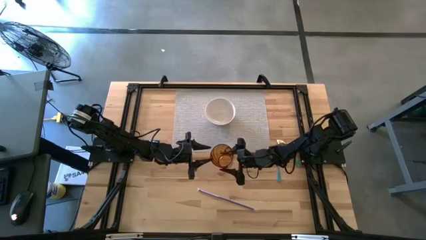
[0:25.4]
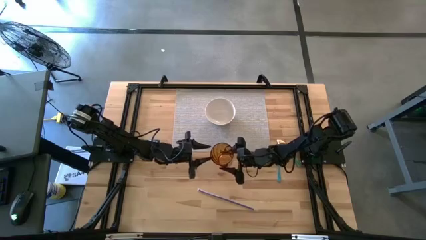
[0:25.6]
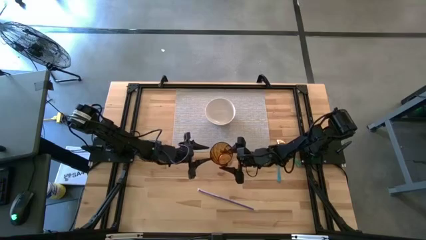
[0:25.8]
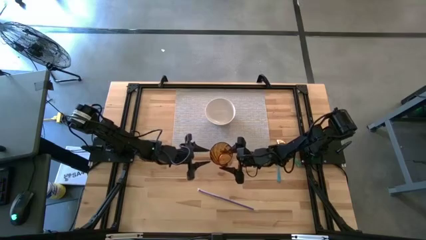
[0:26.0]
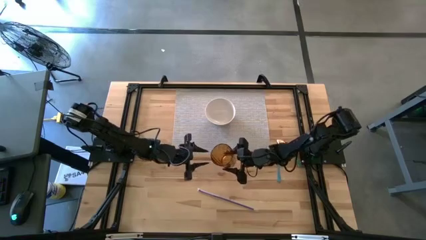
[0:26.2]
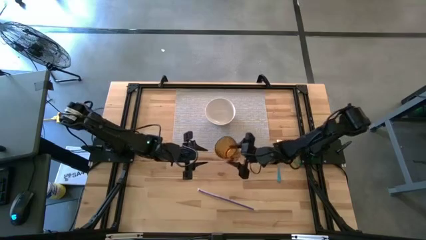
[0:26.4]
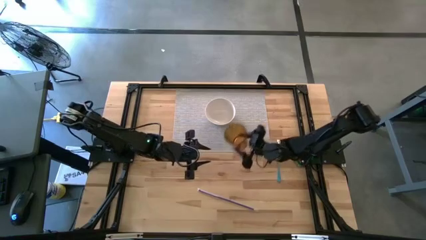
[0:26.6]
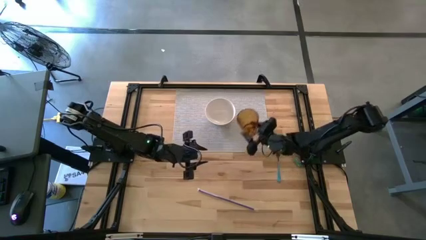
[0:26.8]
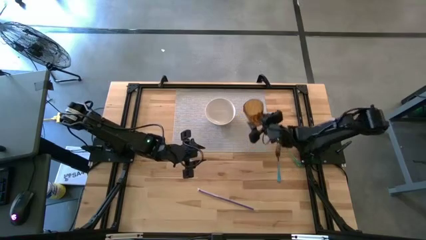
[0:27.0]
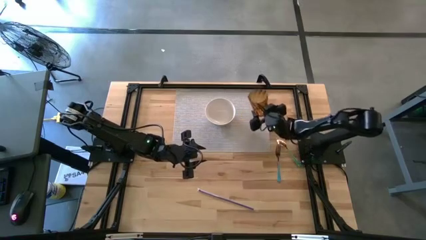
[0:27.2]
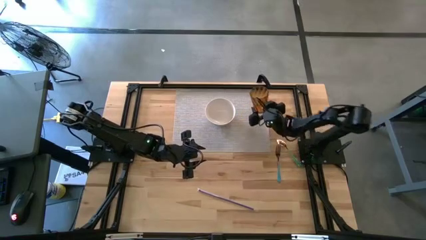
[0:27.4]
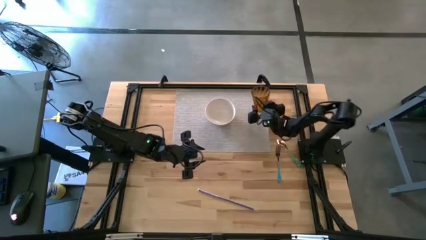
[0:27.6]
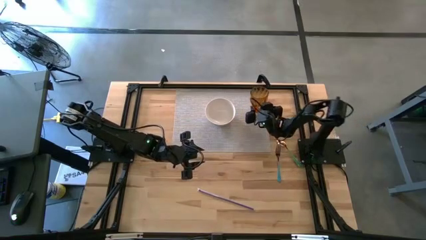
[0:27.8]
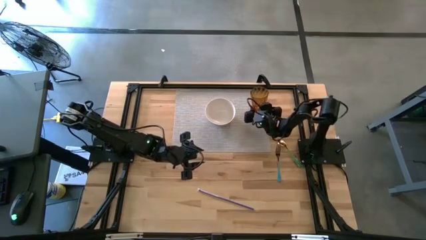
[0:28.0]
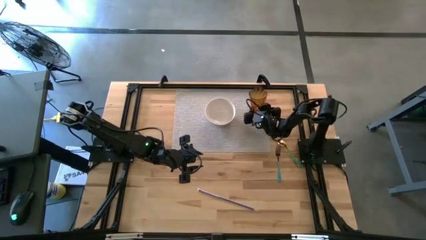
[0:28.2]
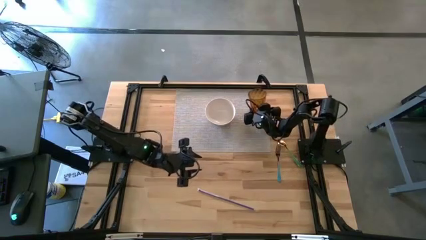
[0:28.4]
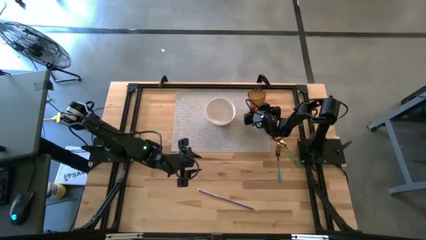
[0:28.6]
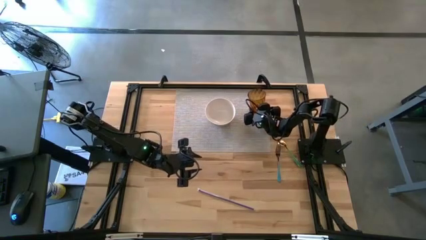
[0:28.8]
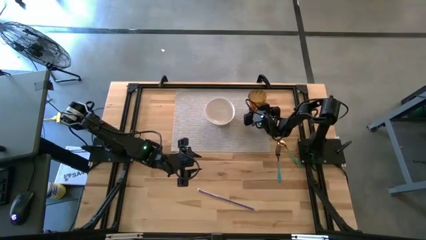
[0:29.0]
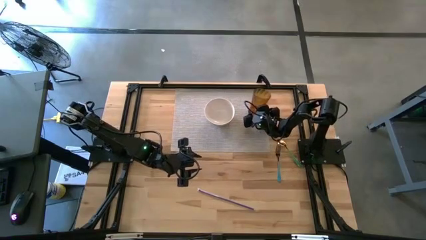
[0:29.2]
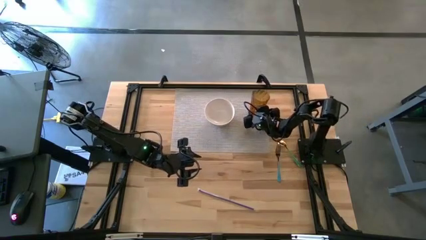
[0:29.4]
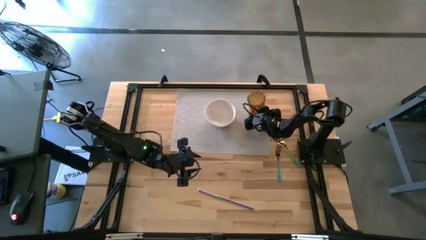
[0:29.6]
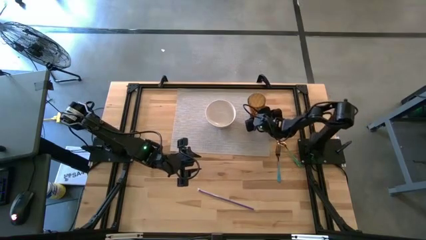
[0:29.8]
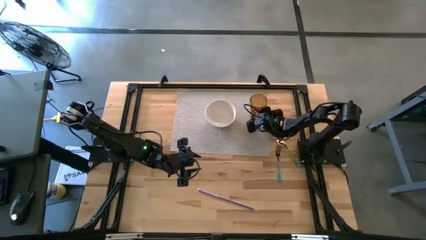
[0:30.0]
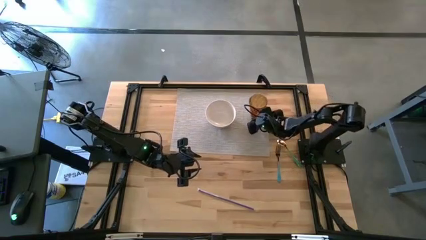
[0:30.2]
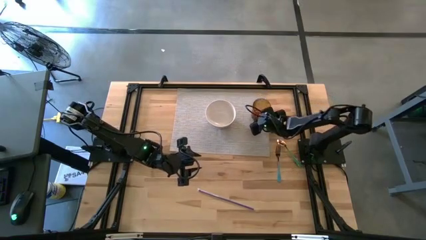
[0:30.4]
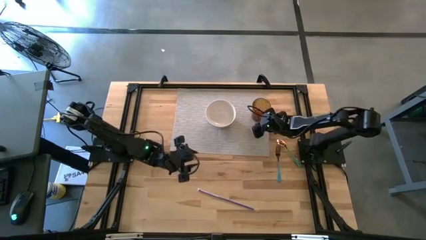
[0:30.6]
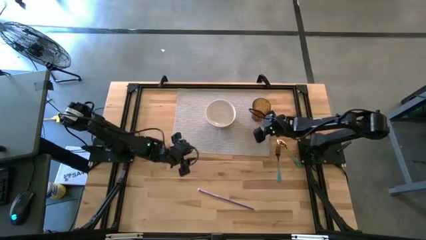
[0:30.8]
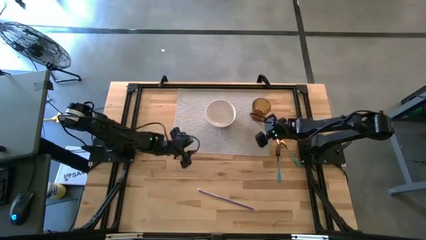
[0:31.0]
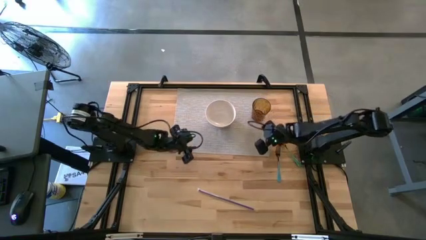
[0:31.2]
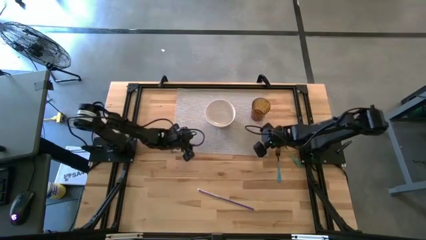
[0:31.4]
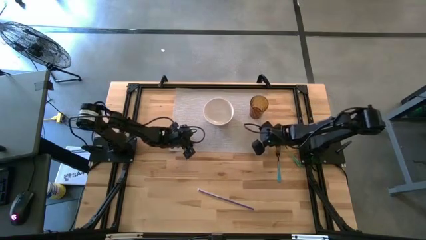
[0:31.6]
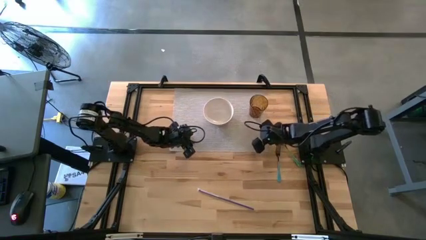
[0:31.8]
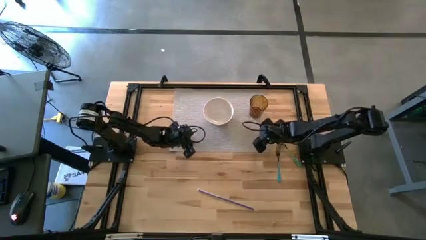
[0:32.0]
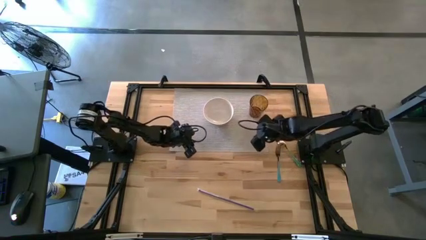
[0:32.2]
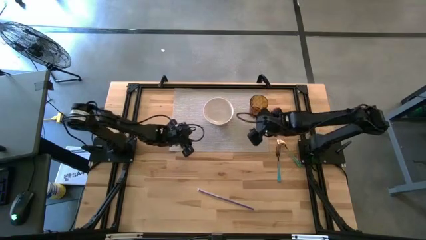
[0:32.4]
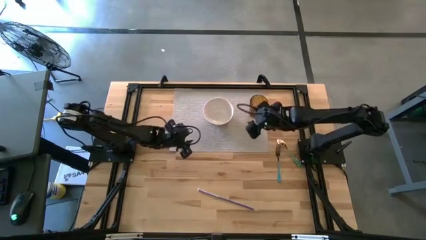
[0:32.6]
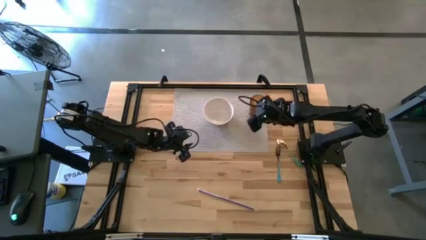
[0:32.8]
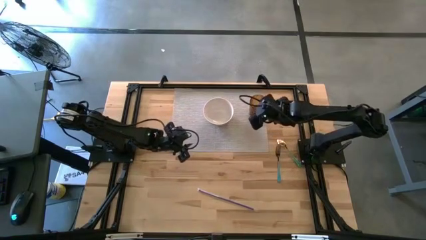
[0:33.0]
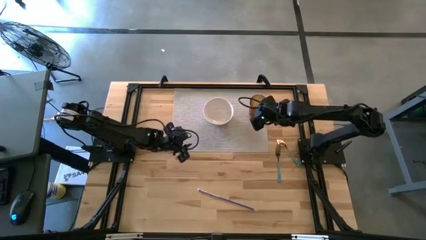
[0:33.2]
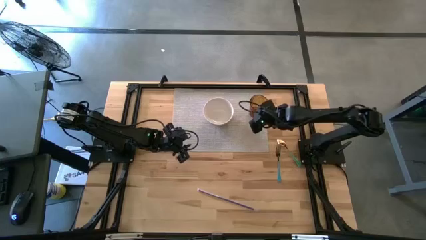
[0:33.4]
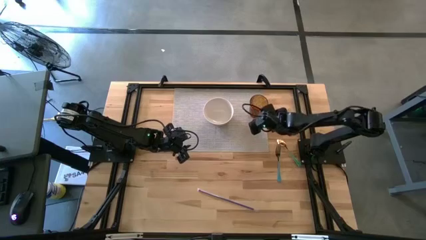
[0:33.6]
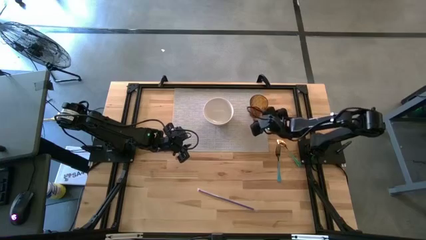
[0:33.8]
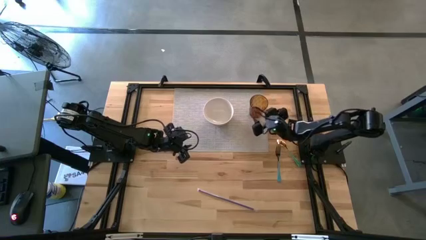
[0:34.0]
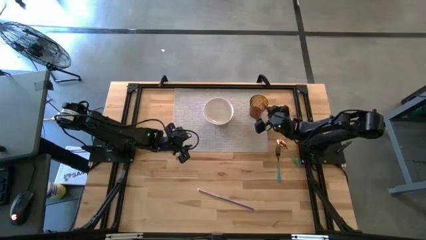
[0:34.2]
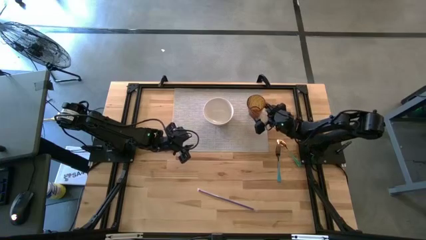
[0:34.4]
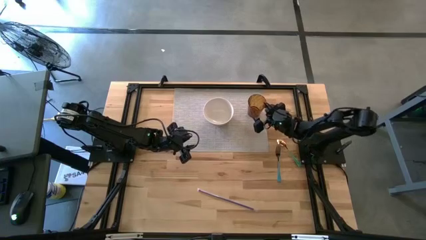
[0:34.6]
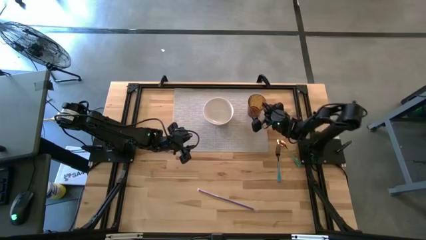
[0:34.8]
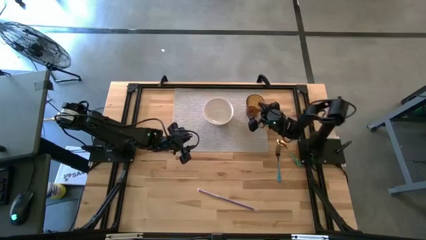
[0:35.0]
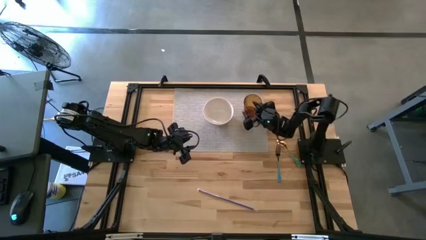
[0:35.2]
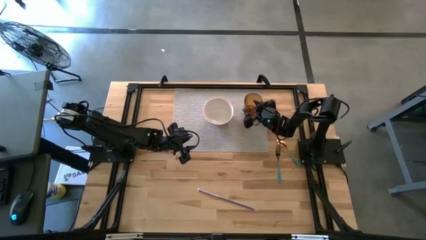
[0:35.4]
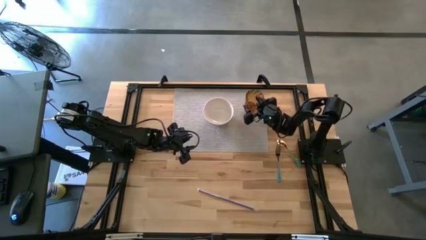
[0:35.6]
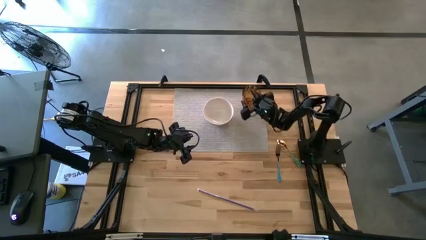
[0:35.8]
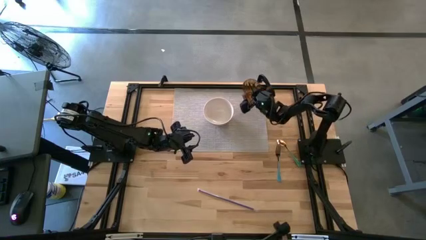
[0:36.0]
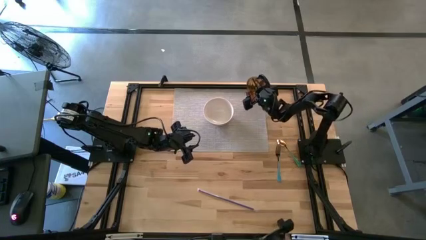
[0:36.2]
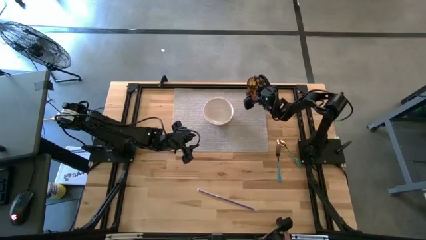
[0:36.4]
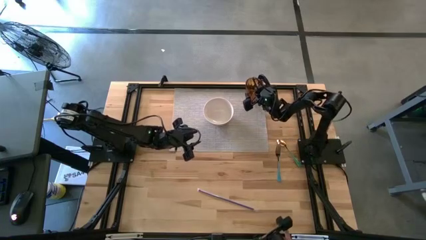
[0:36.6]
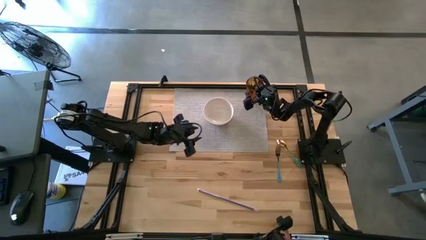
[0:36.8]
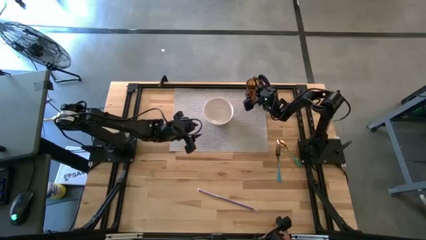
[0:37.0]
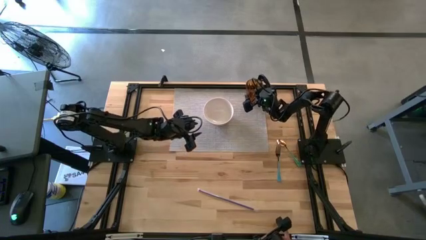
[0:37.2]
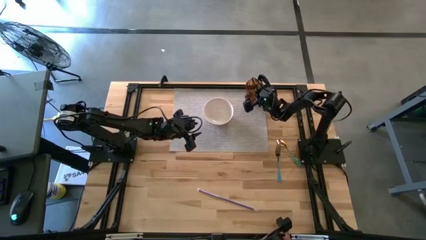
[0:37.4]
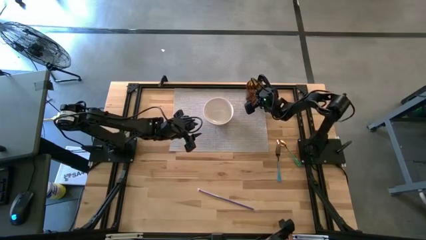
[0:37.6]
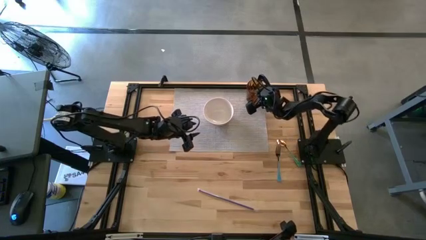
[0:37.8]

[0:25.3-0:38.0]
Task: Pick & Place Utensil
Put the brown cup on the gray mat to the top right of the white bowl

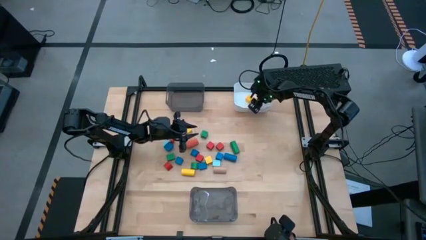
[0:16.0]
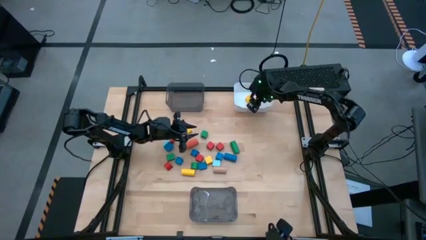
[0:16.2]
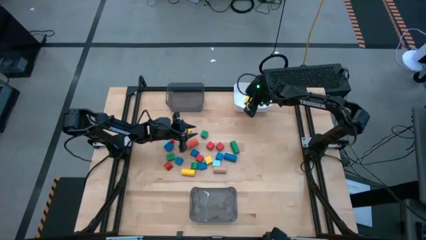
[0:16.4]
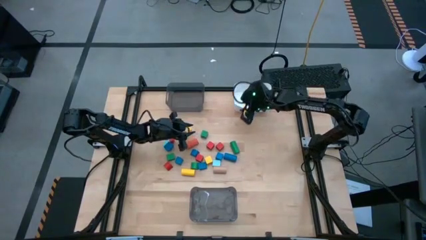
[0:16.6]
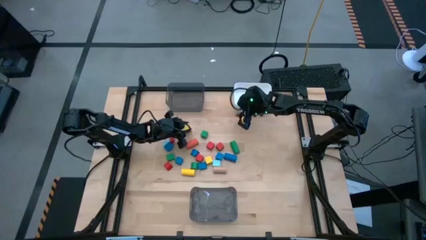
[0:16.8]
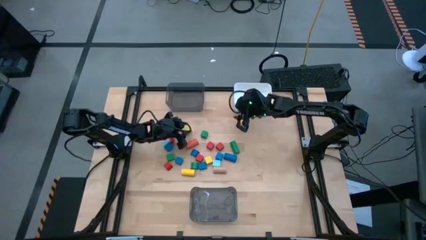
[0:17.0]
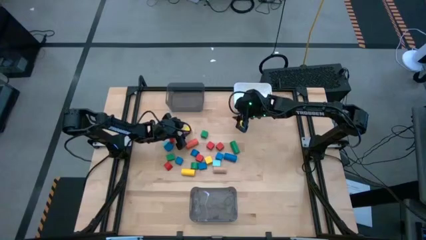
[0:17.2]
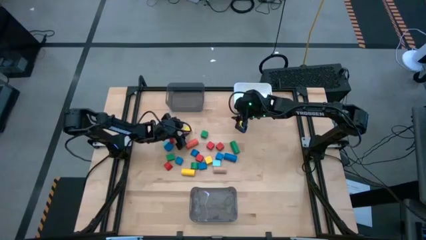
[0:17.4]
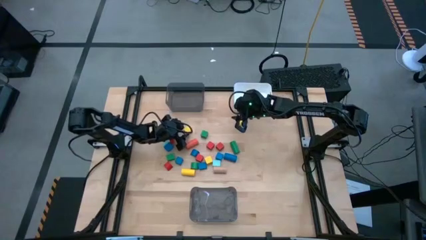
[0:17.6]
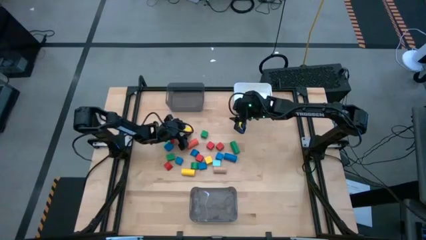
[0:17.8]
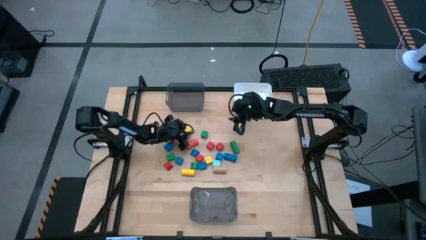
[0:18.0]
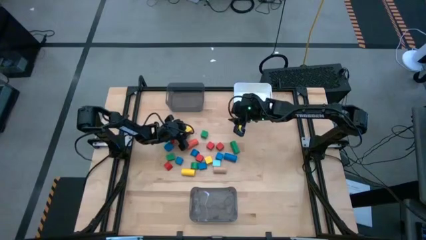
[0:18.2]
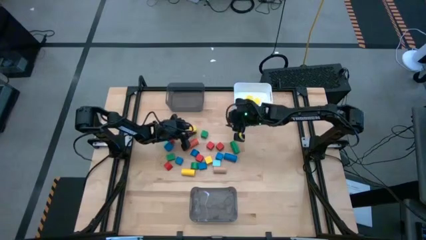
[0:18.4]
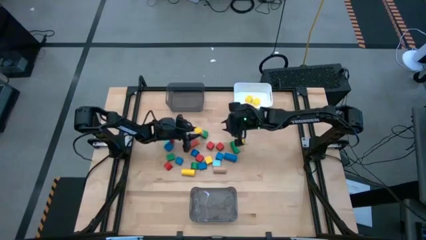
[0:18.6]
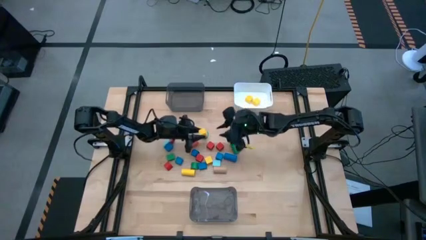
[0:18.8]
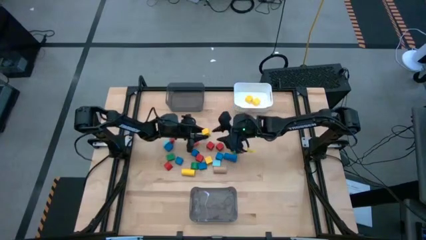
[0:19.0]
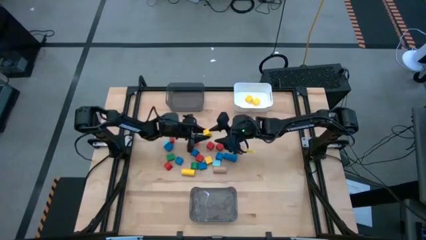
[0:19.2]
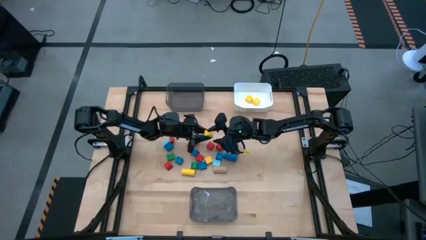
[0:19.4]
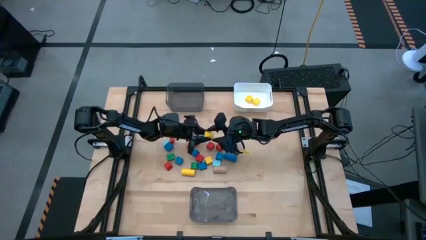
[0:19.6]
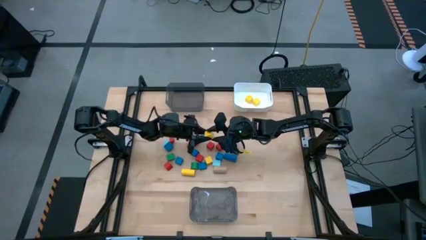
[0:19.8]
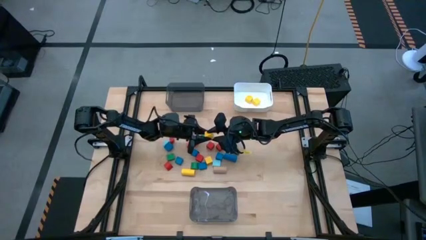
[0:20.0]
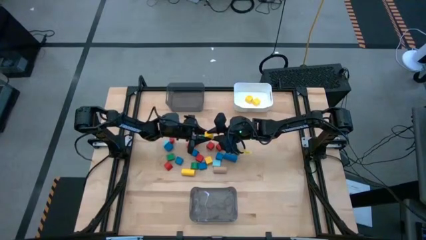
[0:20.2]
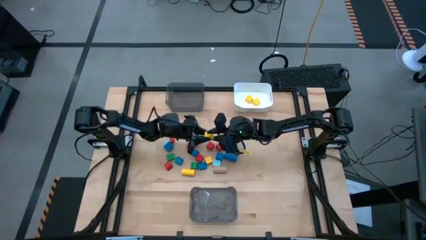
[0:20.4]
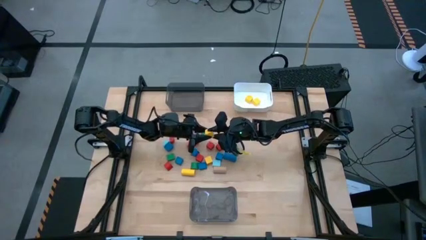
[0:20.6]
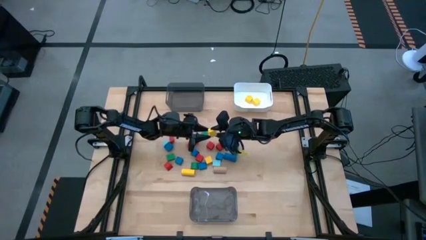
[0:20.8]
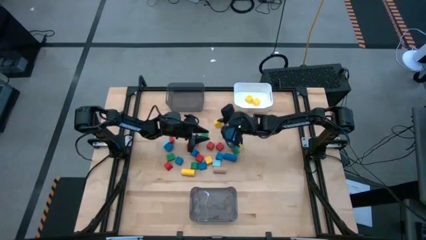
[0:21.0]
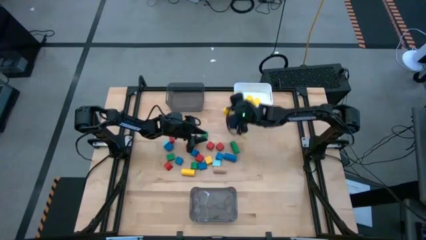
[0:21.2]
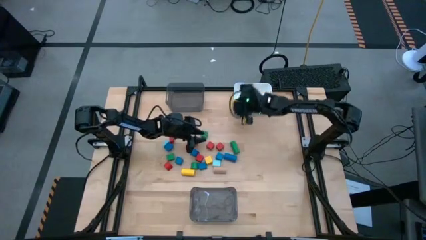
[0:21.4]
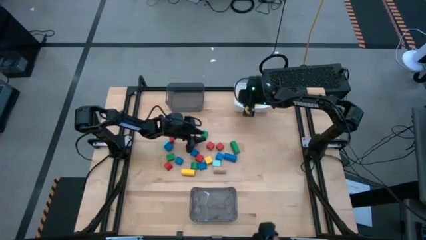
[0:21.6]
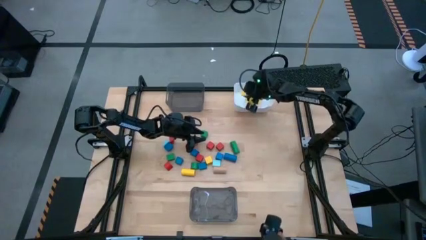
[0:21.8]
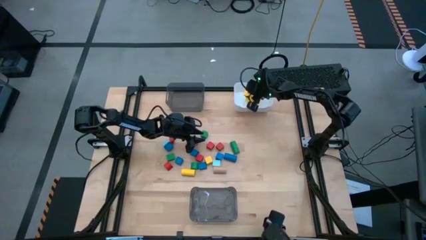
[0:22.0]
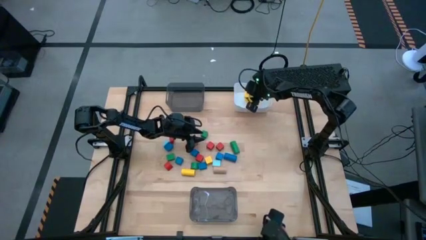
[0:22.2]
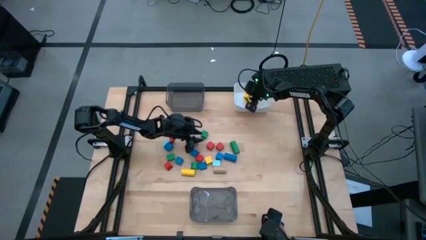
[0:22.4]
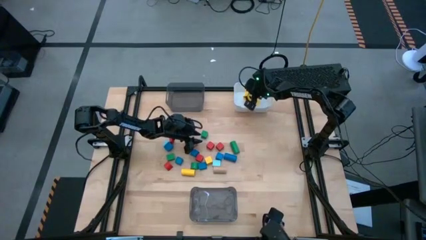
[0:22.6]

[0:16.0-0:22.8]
Task: Sort blocks by size
Put the yellow square block into the white bin
